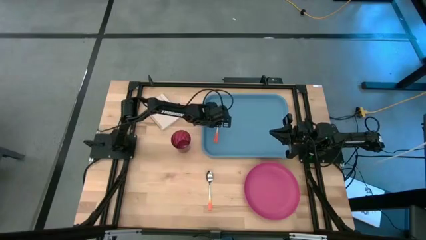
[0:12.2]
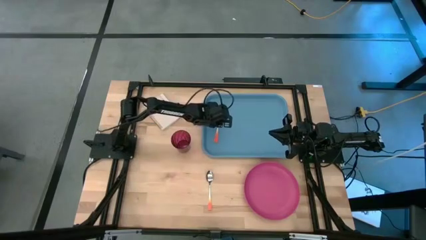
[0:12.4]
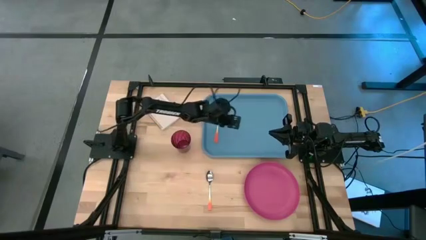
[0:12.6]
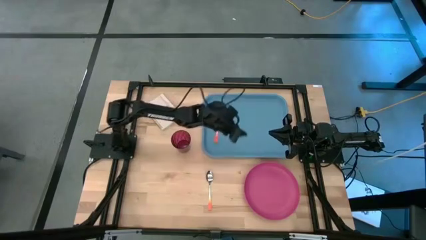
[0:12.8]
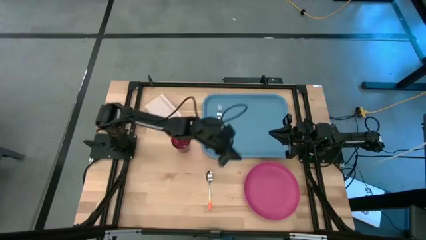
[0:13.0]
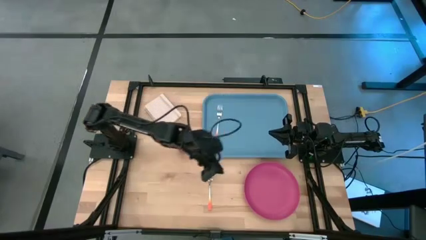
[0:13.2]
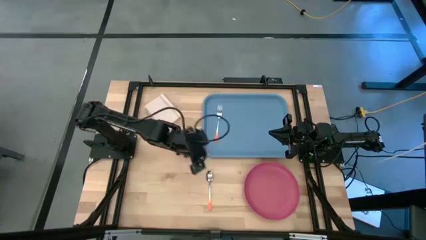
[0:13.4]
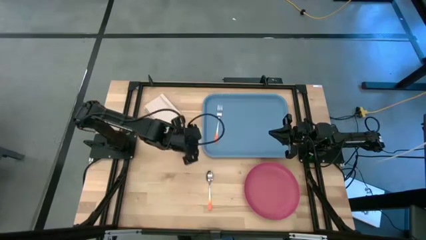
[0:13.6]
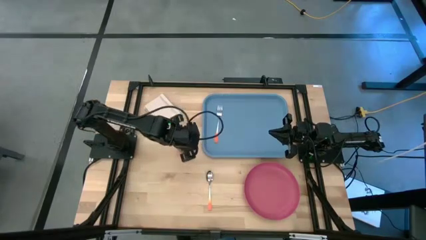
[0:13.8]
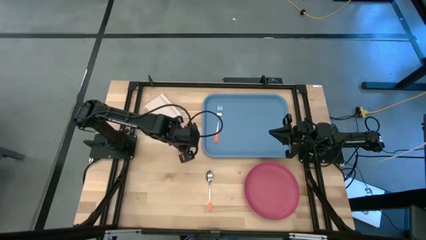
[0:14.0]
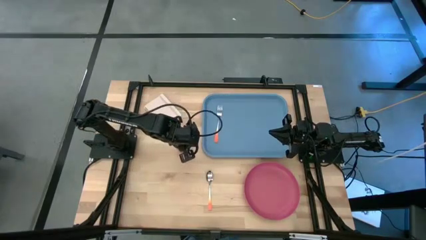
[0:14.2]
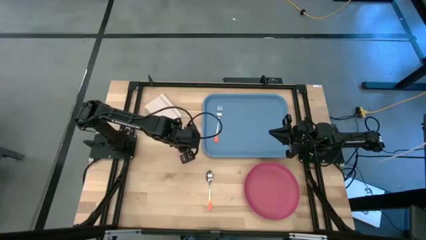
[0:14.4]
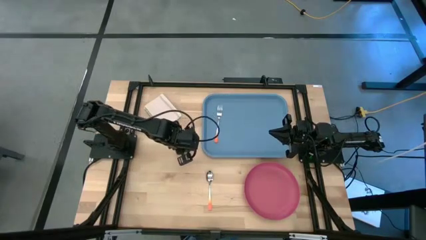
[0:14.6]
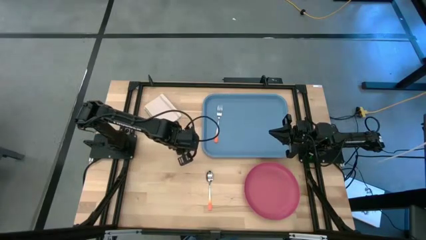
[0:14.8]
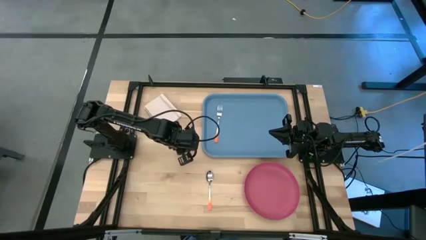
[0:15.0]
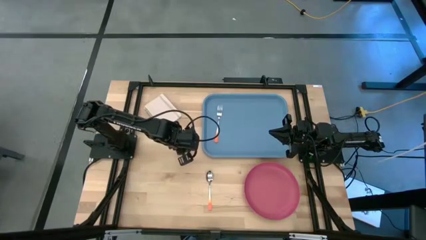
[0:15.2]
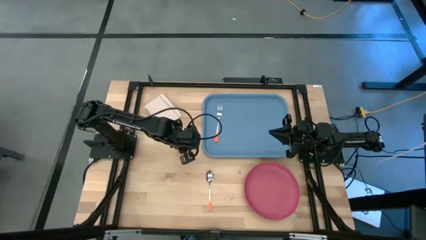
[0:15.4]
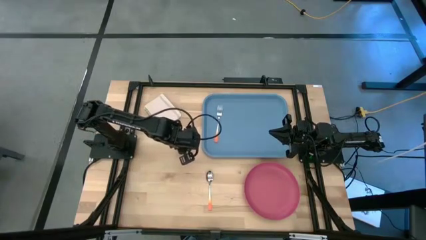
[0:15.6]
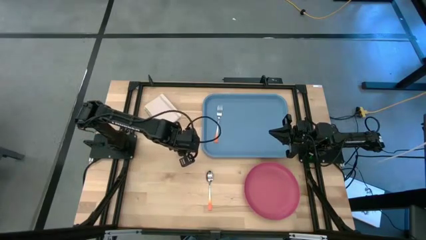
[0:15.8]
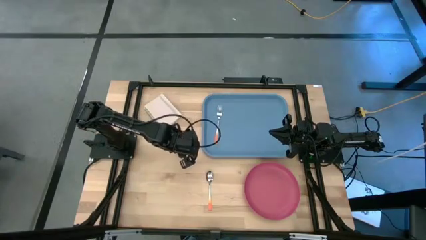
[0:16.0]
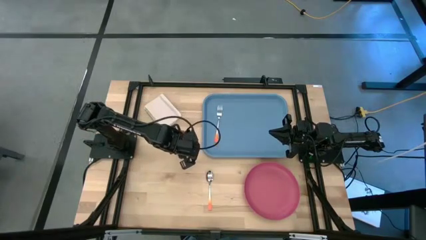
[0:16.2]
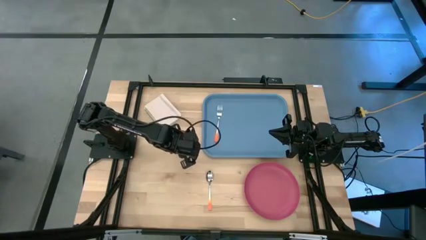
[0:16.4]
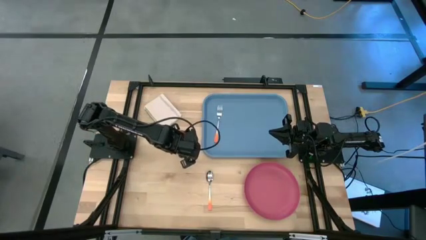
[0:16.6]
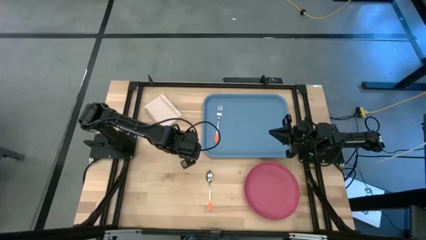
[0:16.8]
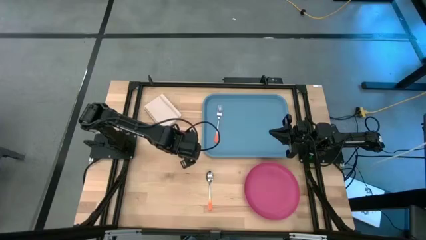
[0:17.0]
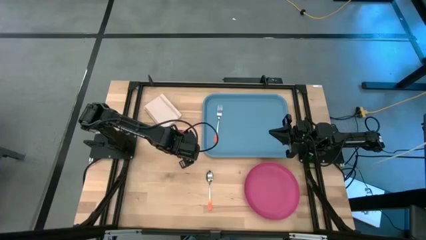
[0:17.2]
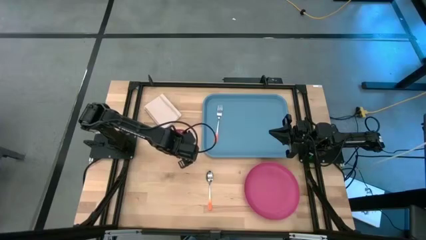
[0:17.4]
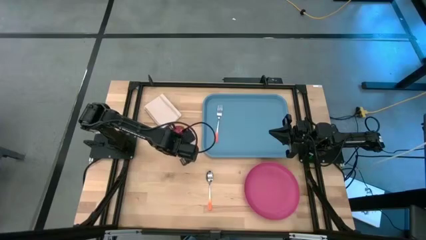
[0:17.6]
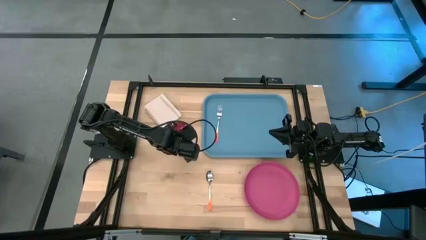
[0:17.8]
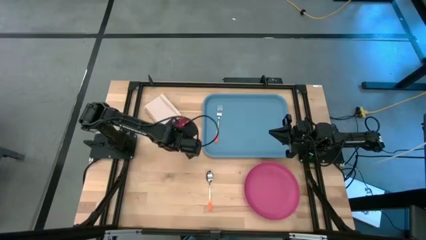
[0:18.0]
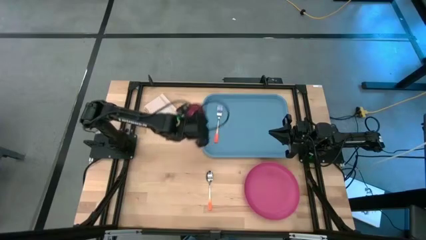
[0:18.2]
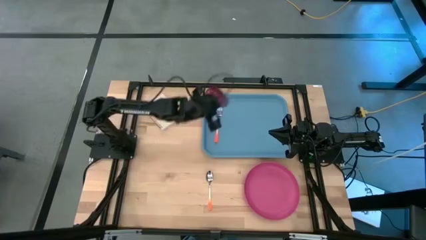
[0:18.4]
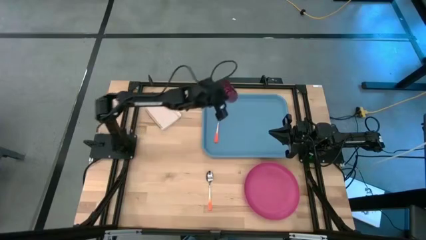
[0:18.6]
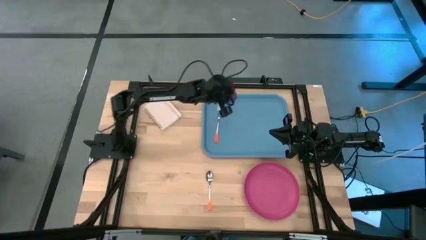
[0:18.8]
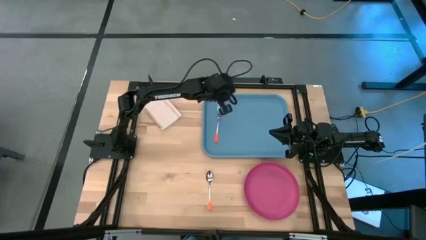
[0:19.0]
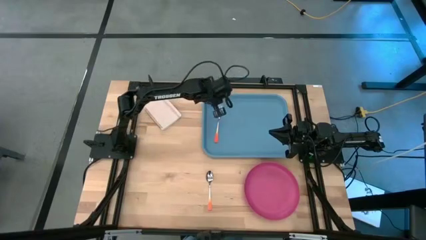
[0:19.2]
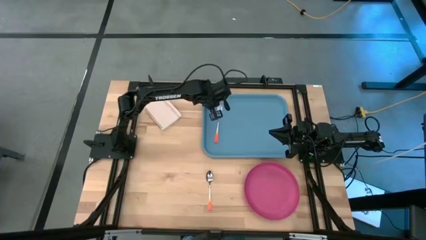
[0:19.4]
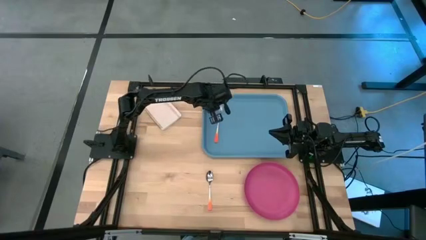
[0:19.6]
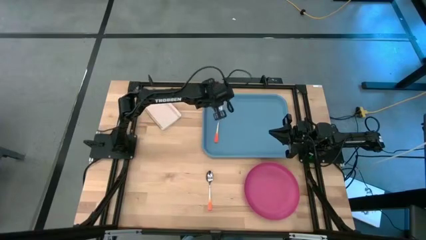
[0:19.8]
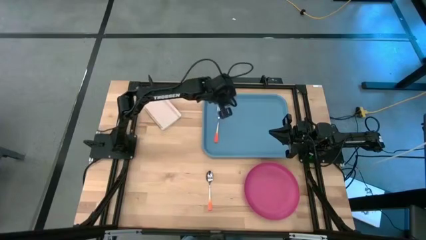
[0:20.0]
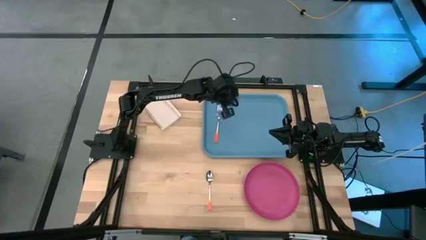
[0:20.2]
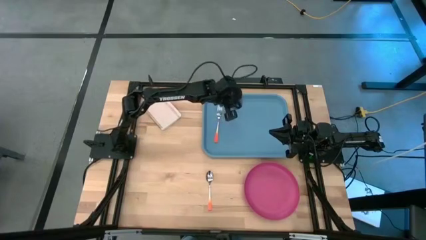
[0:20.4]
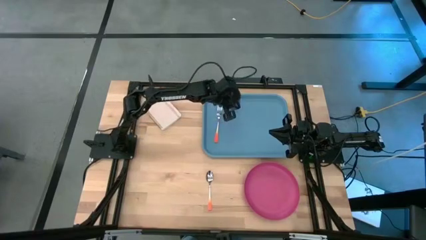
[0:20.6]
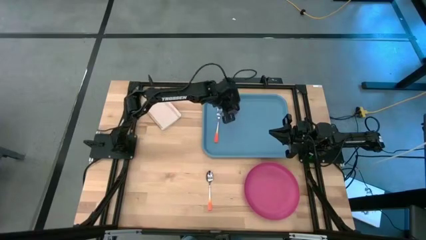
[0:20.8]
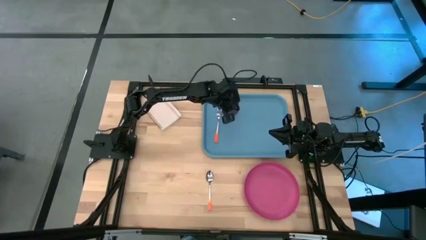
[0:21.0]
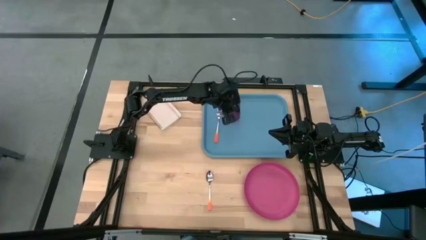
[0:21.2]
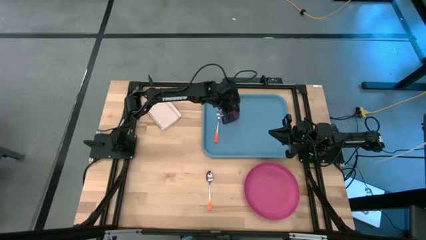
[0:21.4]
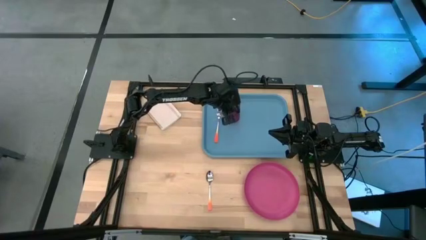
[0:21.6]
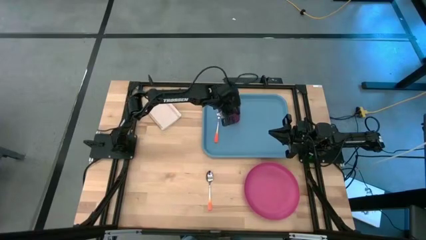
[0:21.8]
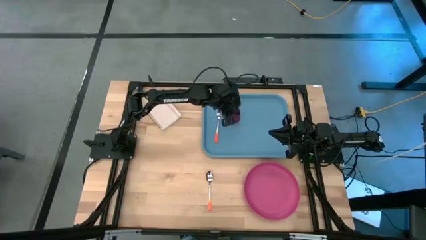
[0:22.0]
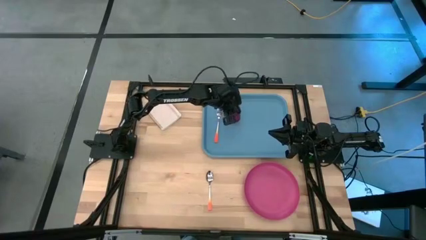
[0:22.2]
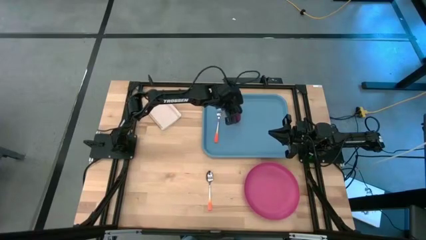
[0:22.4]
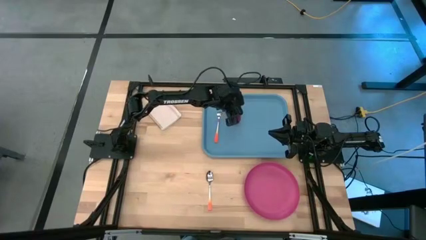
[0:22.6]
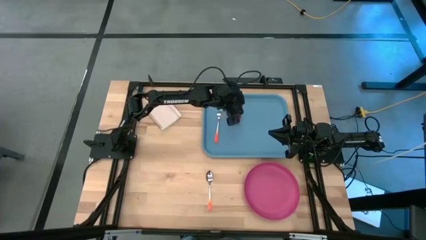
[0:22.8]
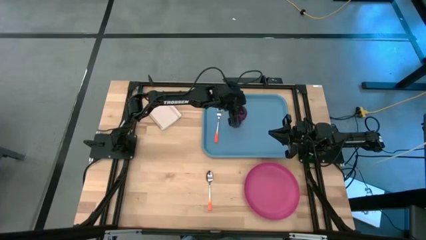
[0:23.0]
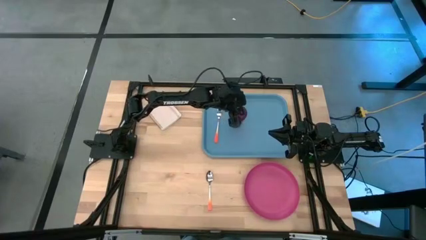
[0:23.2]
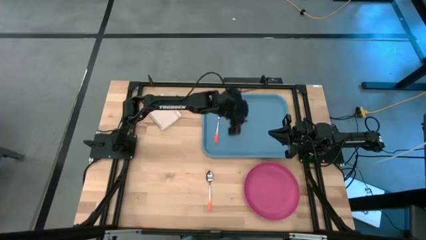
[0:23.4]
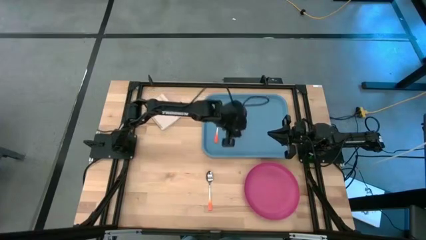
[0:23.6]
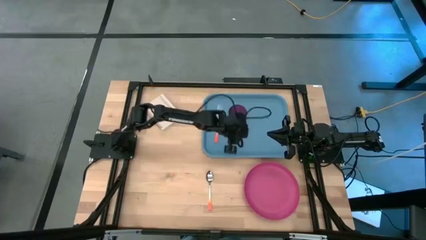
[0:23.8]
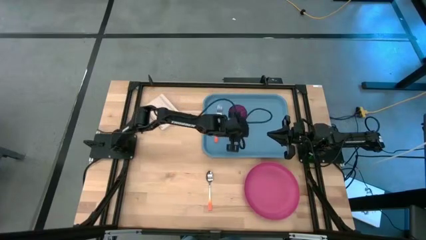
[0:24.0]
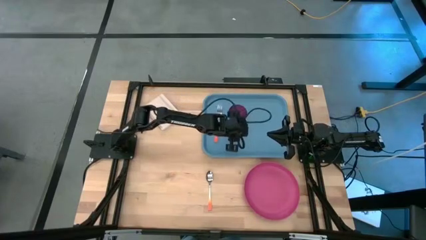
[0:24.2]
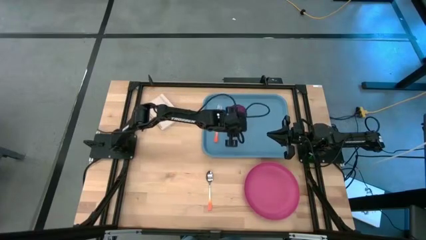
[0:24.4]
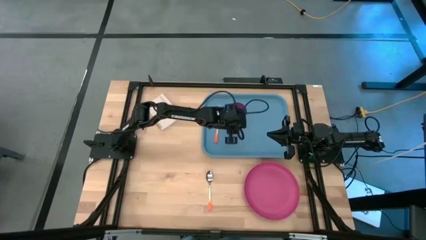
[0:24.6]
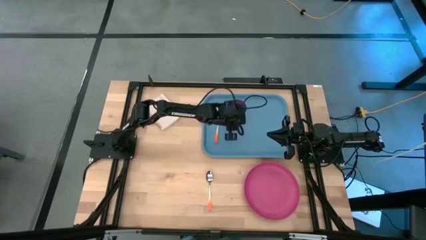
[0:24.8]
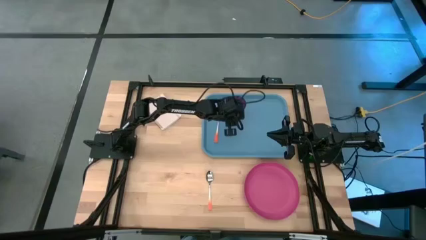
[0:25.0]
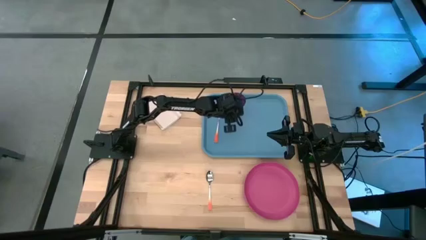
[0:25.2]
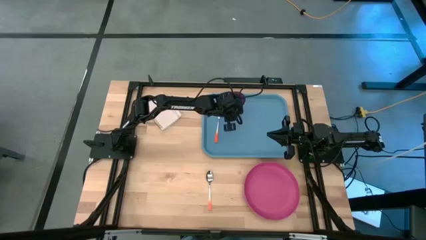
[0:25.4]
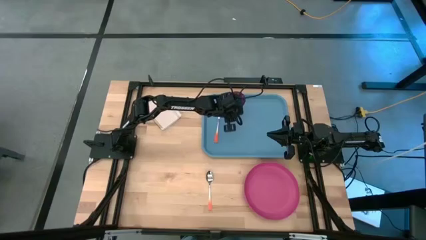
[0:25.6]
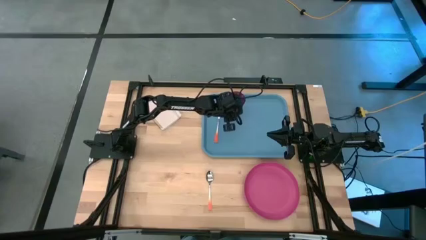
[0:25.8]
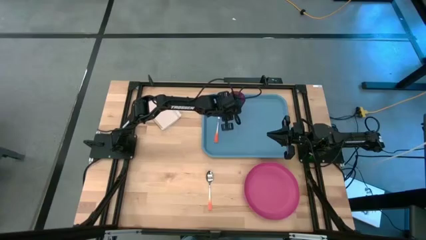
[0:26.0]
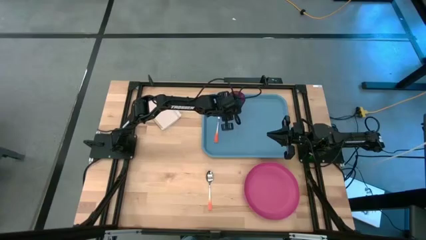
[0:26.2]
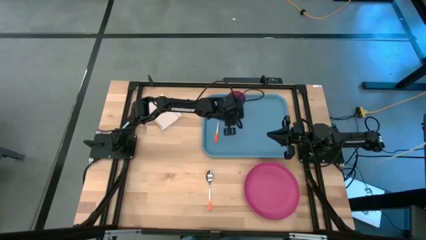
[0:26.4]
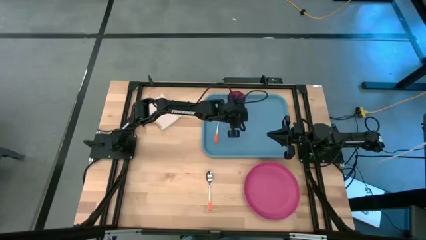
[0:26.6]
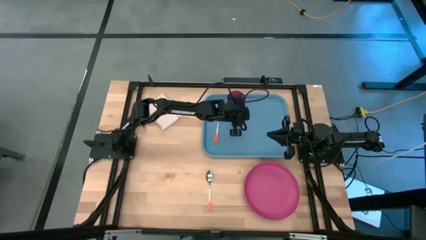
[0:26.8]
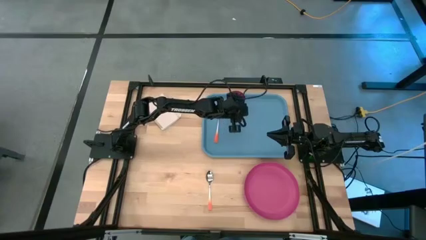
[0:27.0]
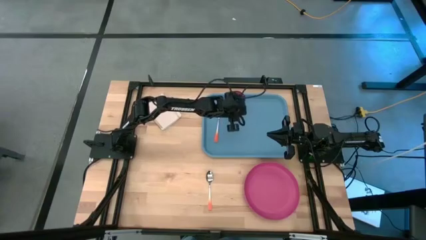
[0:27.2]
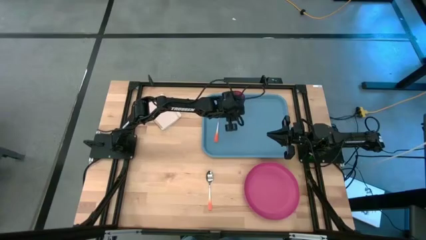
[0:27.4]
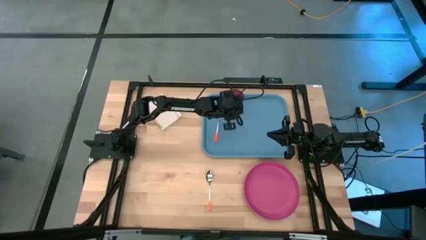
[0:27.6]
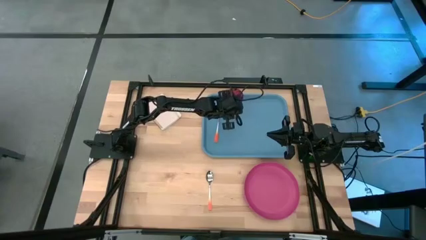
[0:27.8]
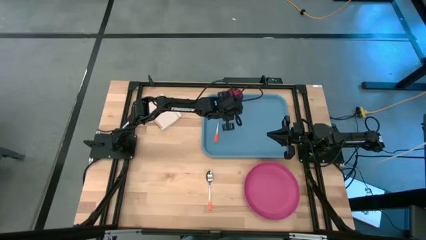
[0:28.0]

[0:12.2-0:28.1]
Task: Pick and place plate/cup/fork/spoon on tray
Put the red cup on the blue tray to the top right of the orange fork

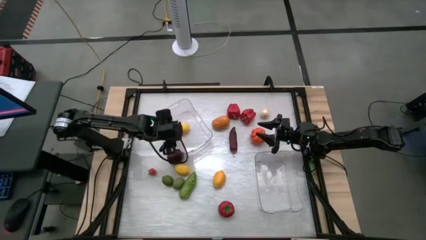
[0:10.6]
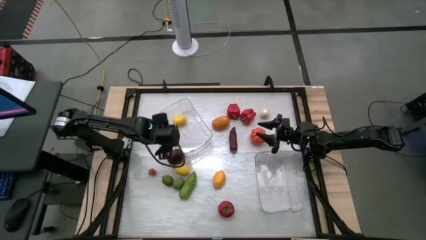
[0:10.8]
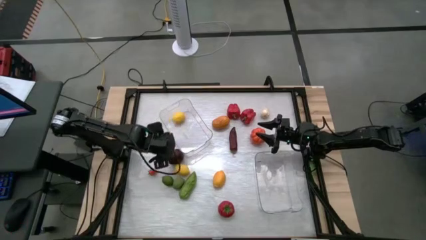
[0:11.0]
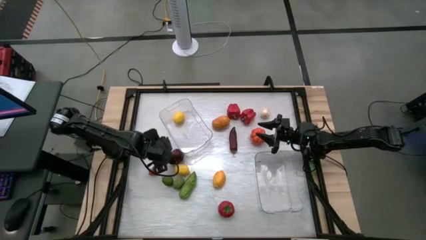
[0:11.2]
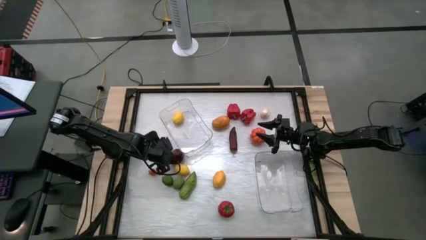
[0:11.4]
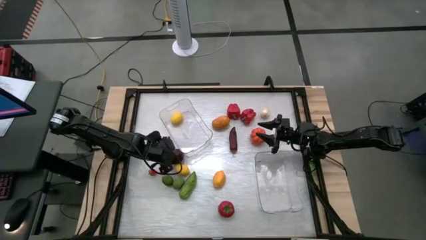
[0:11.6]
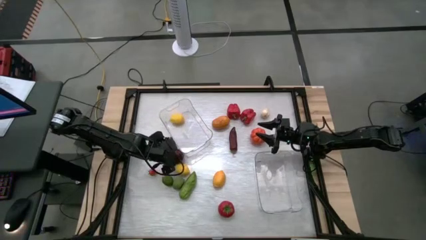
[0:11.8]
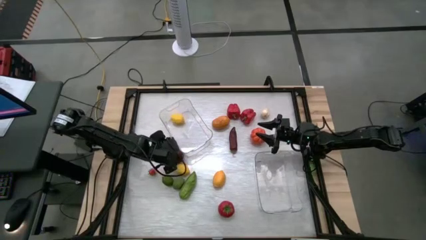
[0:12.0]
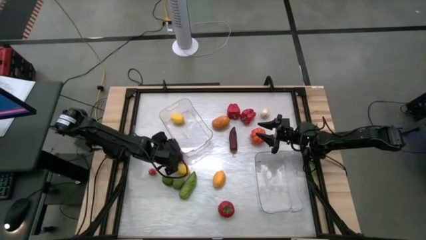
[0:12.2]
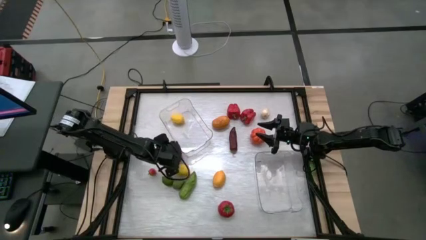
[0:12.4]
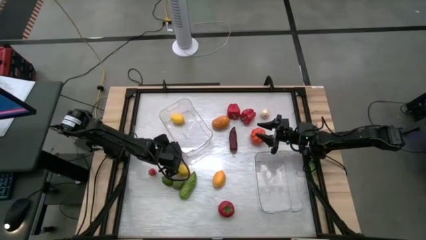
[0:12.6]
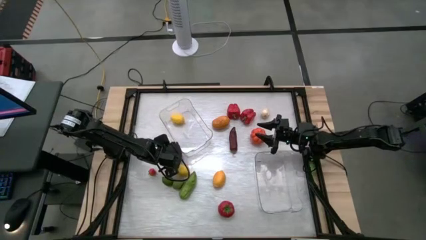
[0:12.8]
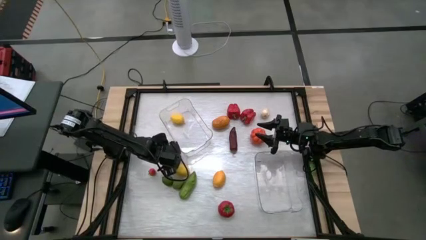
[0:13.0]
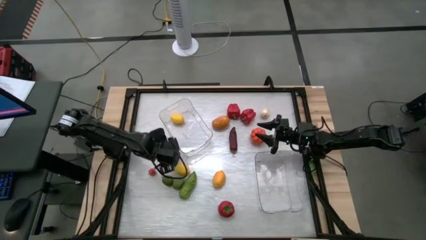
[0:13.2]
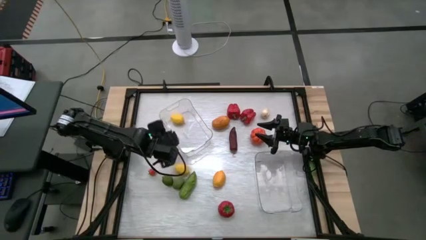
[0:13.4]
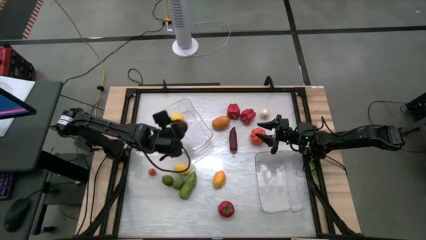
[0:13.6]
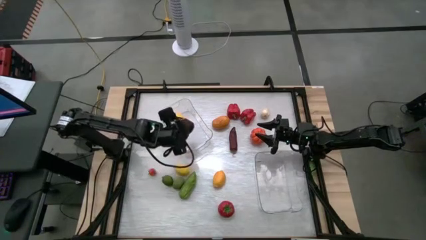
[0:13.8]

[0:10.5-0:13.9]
Task: Sort produce into baskets
Put the red apple into the top transparent bin
